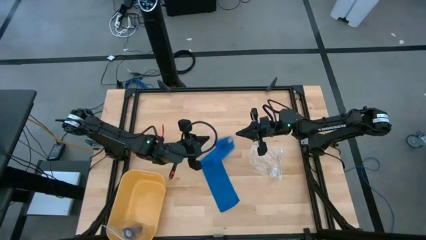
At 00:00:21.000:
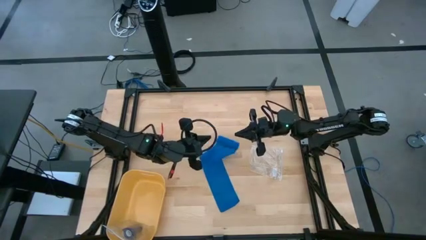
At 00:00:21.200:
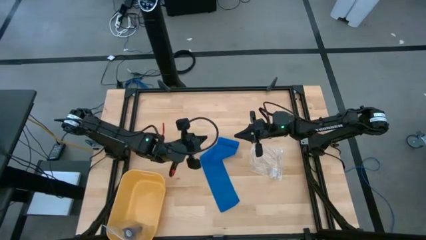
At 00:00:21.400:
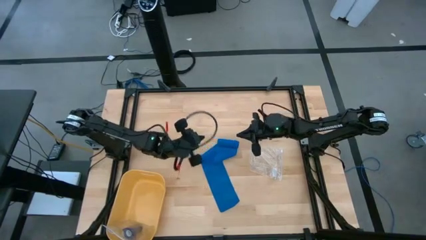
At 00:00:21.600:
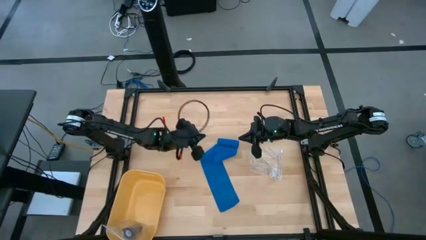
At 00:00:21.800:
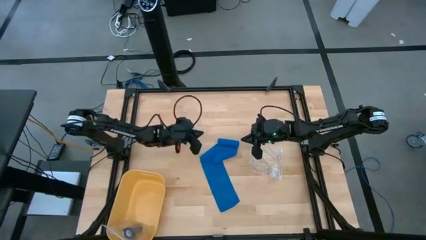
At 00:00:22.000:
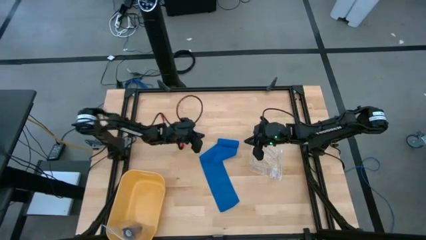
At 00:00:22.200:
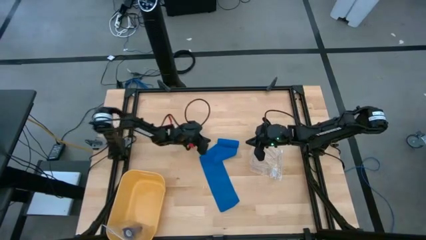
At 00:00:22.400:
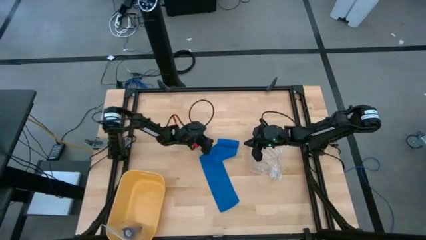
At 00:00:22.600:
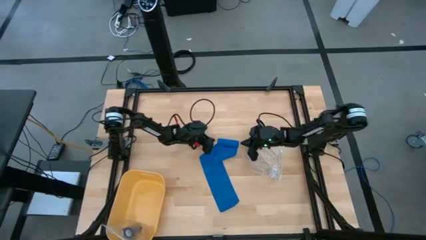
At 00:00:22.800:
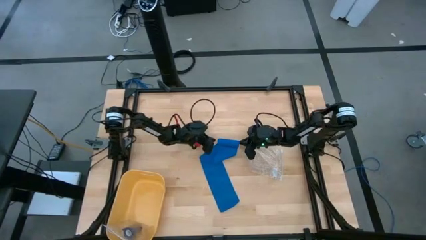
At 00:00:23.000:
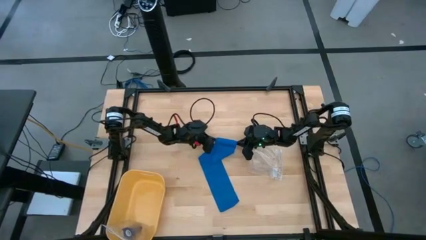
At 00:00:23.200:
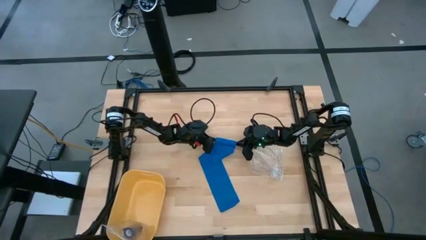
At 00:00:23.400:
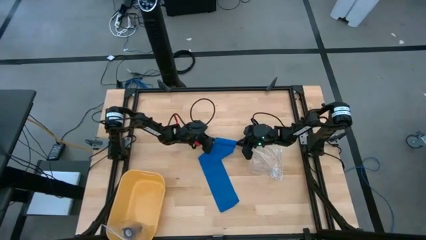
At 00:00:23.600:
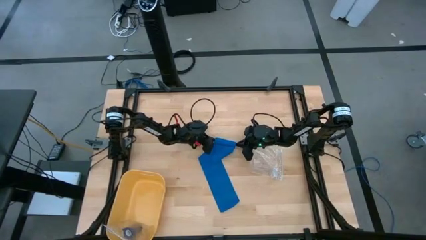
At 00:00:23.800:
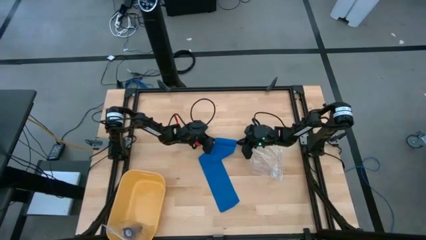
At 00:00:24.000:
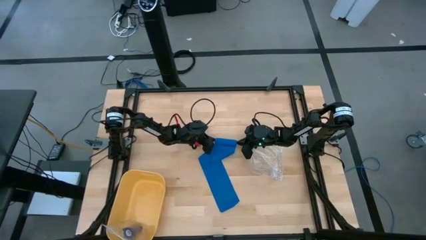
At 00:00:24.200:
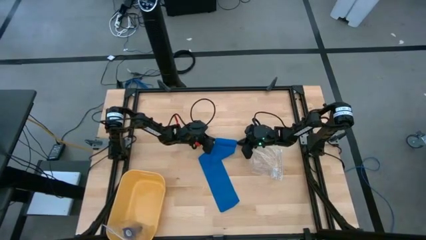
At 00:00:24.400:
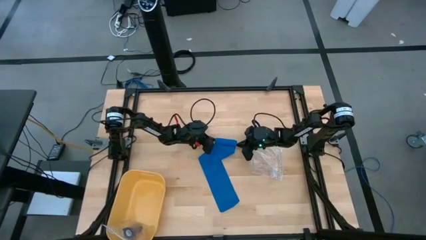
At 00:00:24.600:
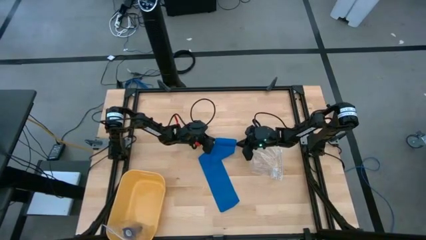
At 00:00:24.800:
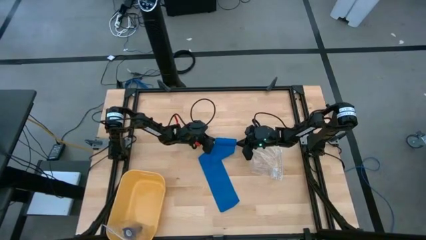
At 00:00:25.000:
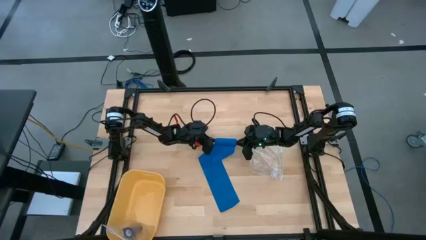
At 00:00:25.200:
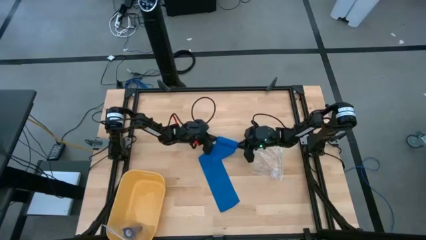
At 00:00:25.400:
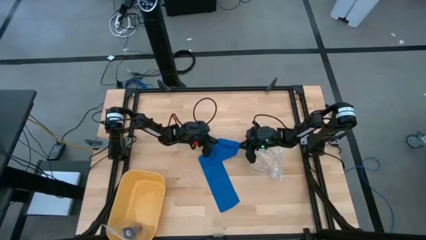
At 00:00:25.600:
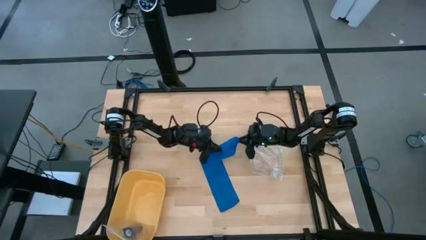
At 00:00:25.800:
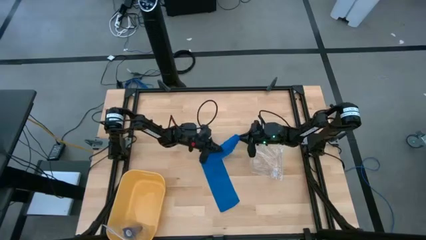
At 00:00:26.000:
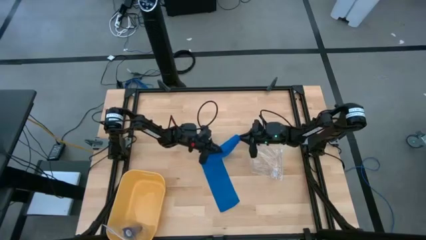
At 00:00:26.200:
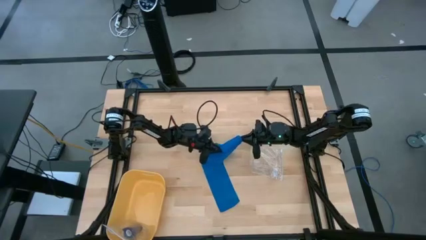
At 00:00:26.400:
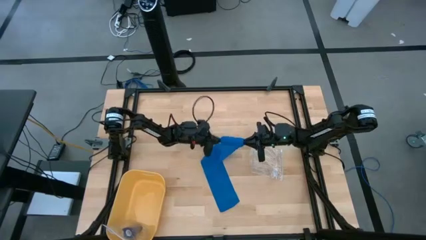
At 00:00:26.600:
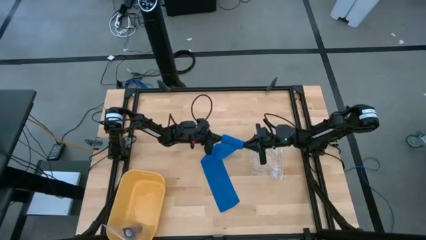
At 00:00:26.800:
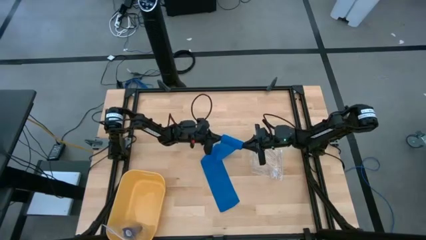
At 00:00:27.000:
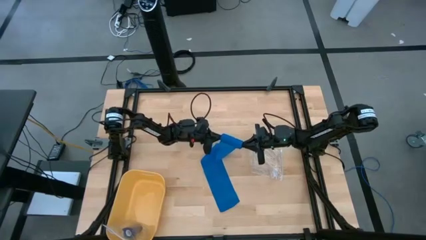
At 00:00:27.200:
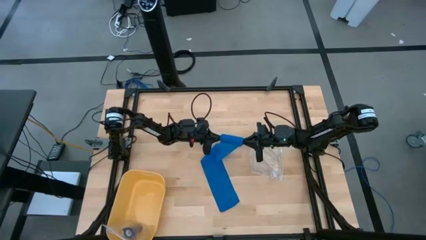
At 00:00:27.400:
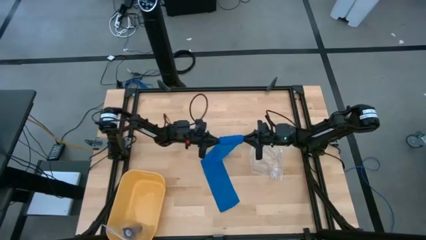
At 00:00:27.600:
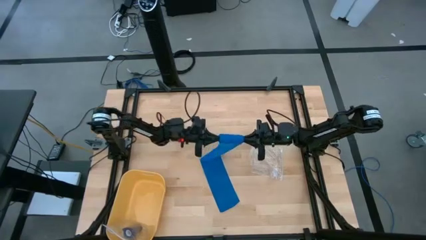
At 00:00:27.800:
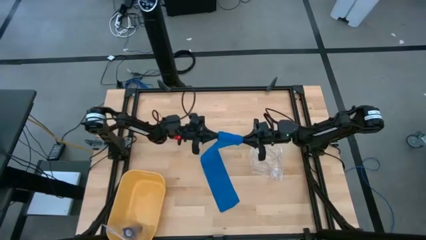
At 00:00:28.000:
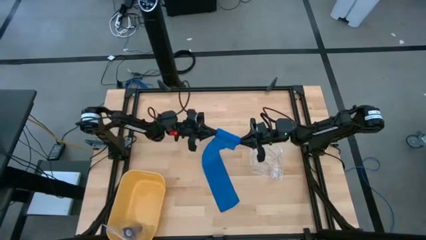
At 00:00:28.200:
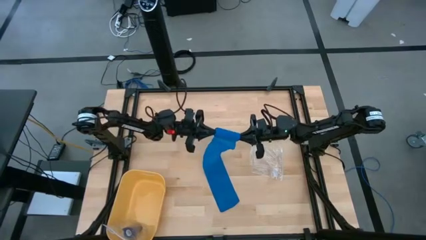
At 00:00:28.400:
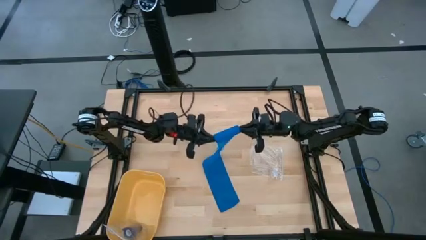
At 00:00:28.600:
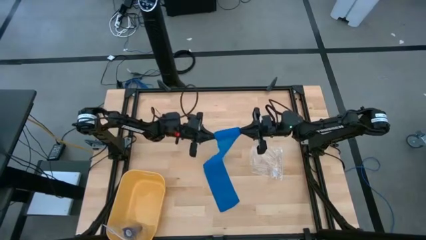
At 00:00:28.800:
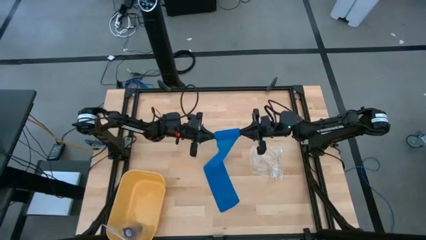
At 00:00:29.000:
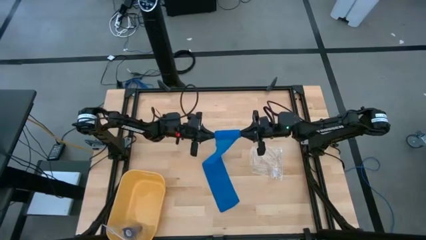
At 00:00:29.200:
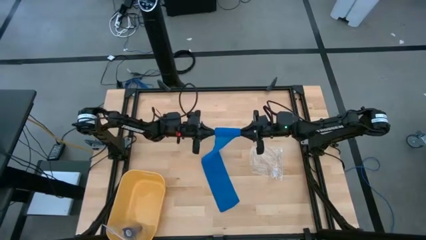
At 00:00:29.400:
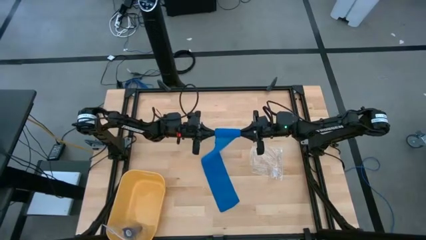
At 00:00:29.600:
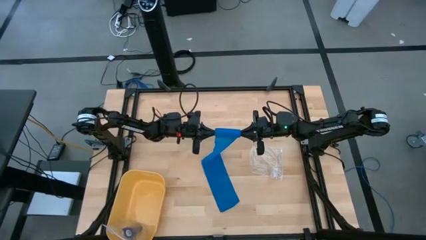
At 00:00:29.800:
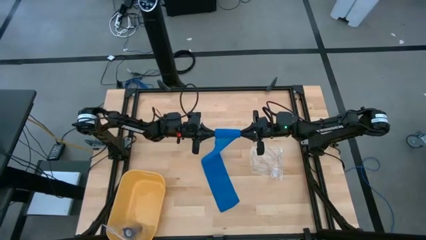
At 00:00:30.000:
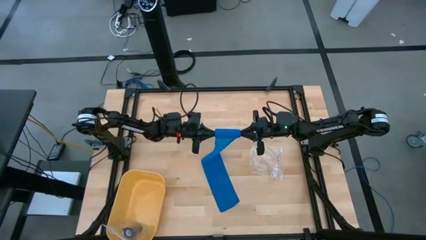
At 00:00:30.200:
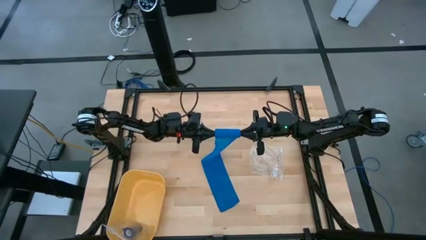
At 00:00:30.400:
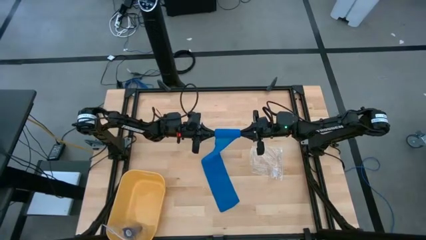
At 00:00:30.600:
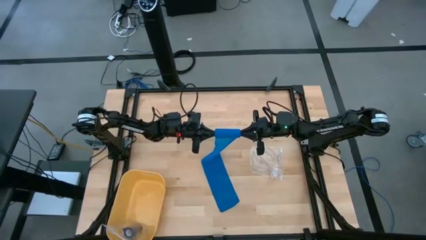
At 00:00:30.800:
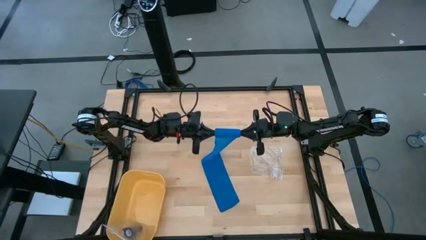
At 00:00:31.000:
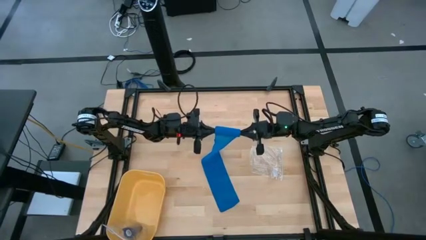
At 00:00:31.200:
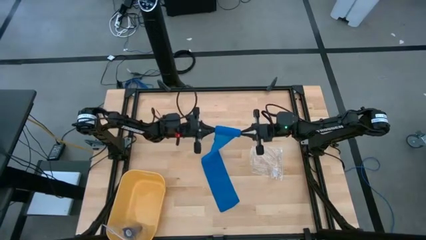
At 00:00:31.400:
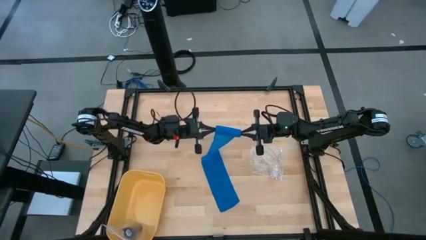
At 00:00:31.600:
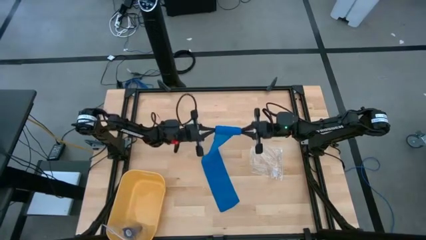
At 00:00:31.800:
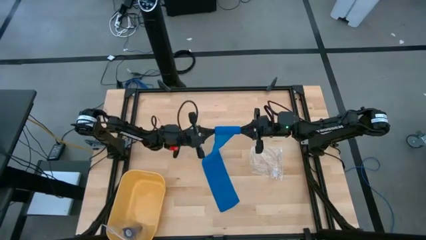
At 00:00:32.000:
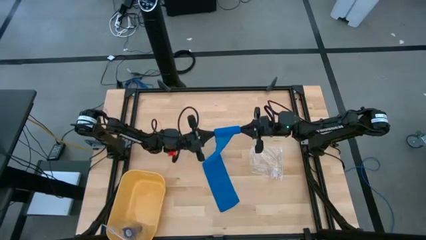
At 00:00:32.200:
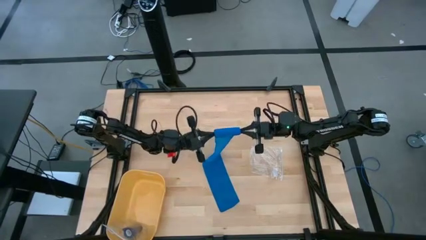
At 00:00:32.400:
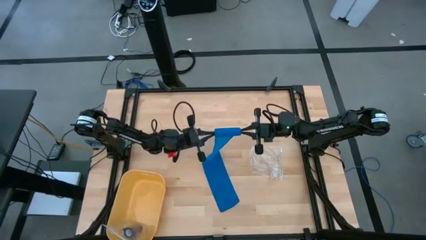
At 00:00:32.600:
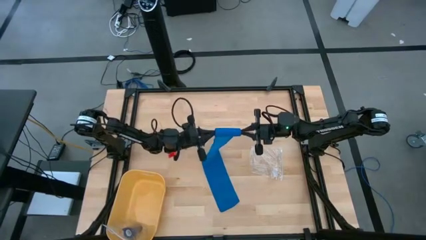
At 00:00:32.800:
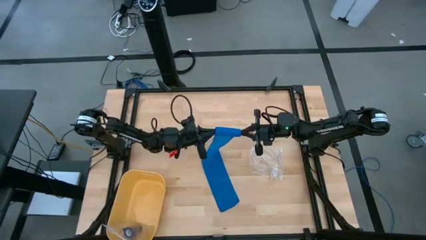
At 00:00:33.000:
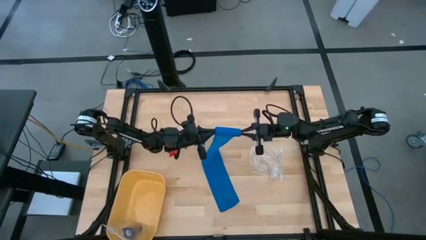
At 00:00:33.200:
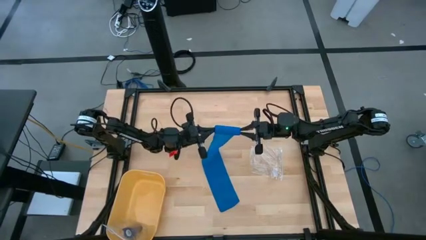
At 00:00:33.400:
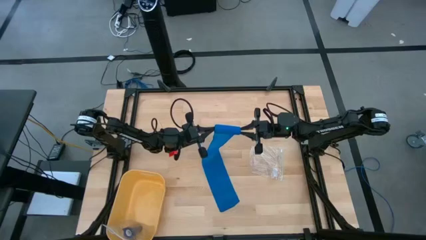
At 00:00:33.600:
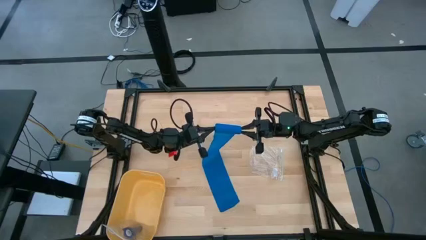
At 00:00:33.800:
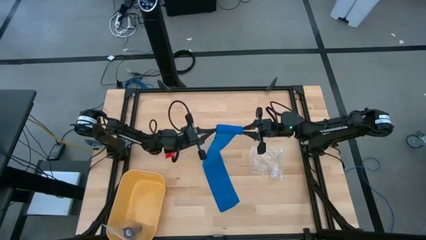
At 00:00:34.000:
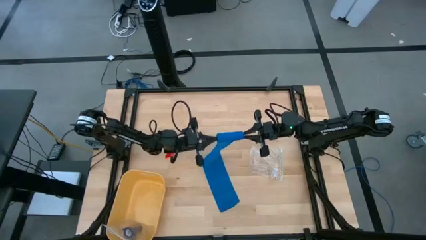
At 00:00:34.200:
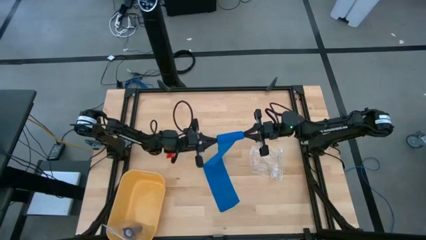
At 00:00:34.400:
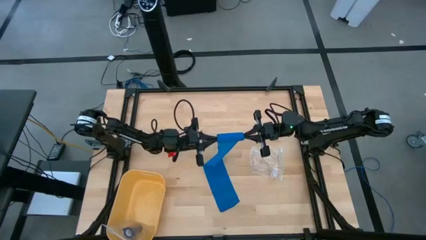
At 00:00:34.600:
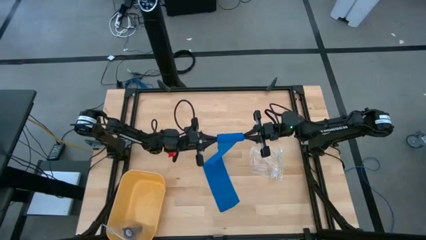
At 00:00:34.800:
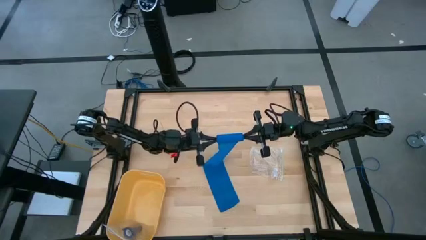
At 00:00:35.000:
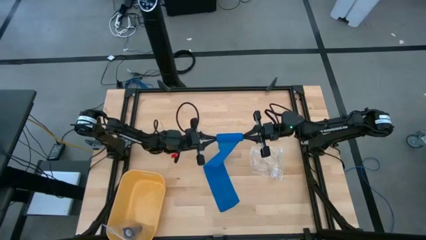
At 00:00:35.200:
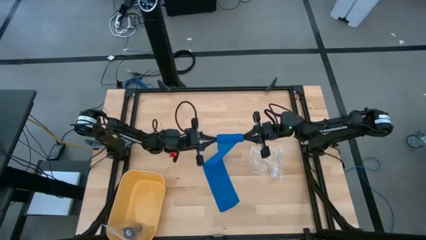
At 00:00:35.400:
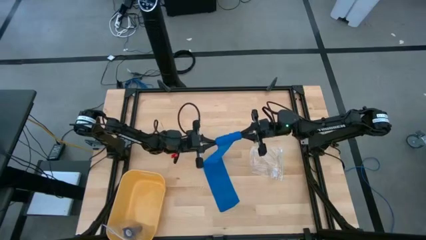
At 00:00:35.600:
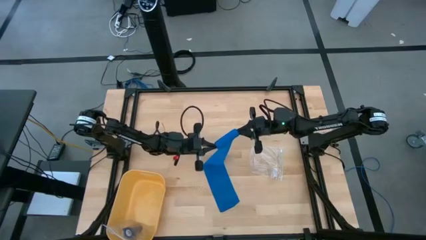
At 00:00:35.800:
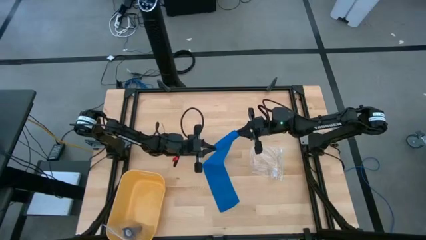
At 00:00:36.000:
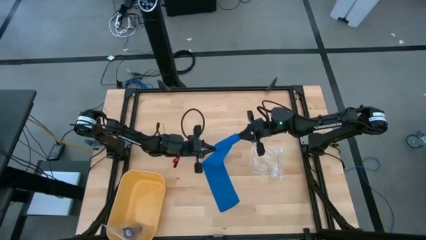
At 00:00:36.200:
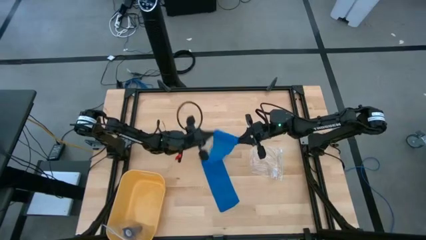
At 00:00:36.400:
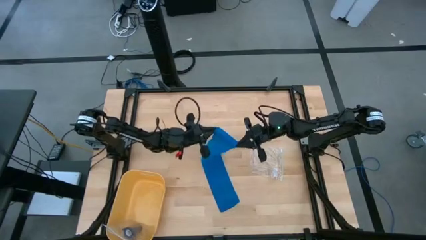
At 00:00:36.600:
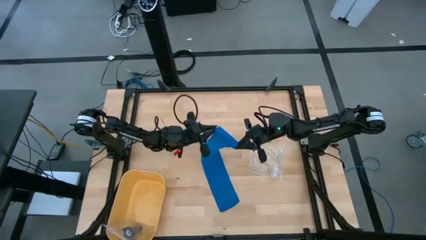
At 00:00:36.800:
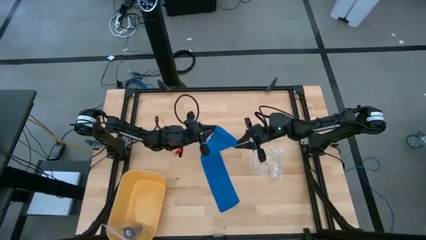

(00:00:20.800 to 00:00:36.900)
Task: Roll bandage
Roll the blue bandage
